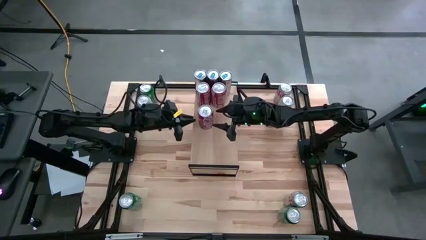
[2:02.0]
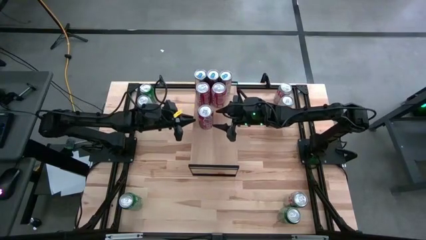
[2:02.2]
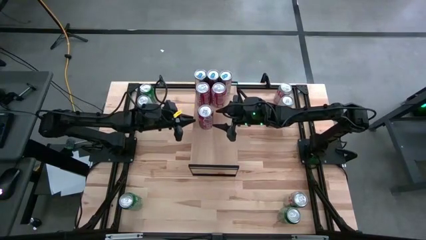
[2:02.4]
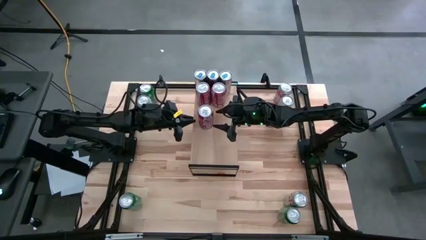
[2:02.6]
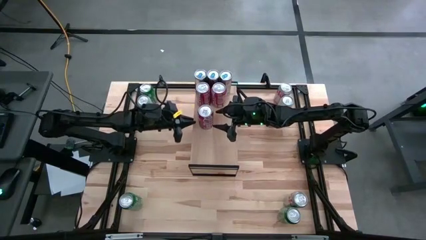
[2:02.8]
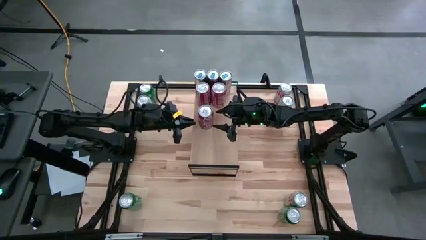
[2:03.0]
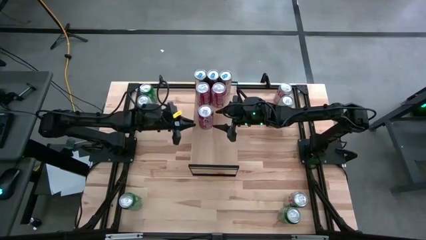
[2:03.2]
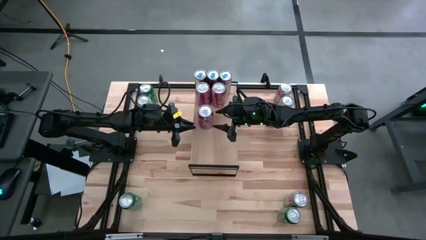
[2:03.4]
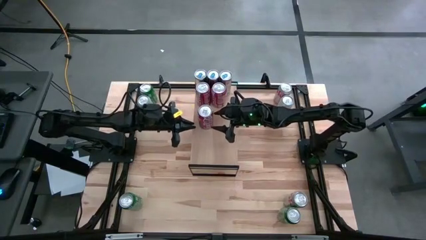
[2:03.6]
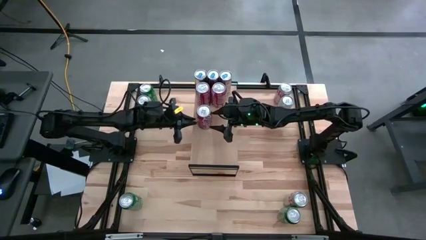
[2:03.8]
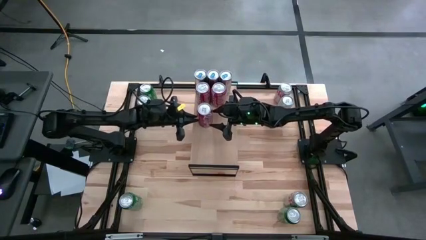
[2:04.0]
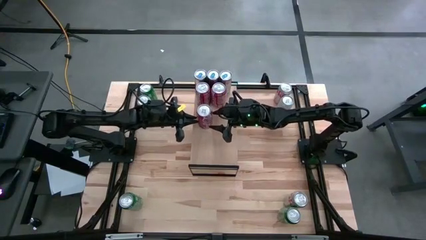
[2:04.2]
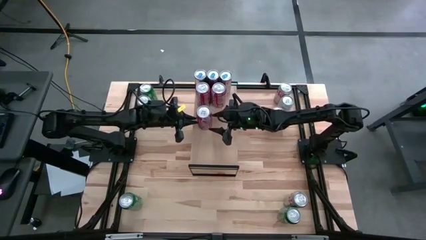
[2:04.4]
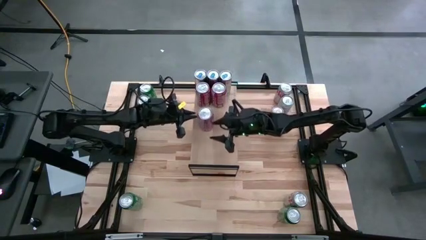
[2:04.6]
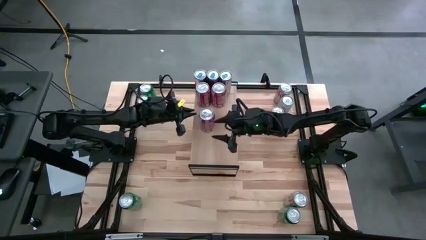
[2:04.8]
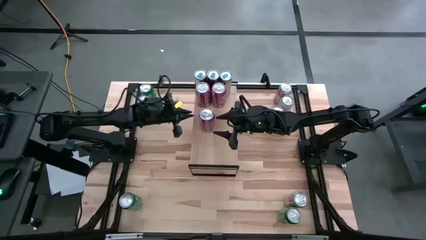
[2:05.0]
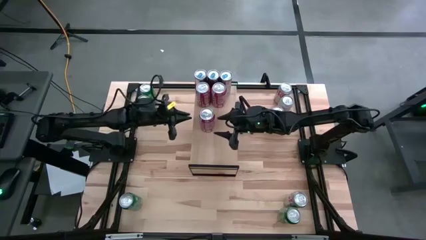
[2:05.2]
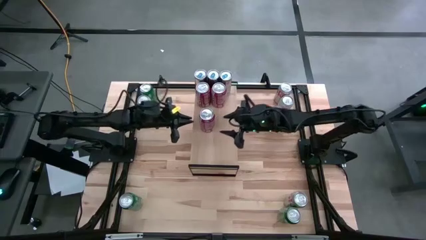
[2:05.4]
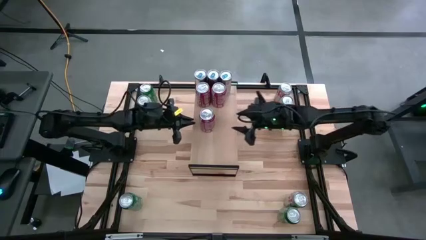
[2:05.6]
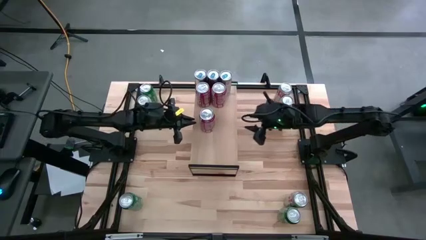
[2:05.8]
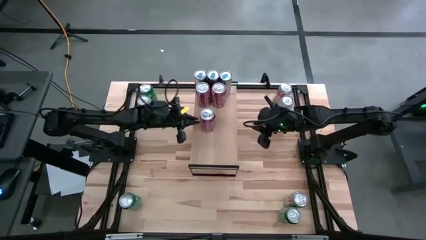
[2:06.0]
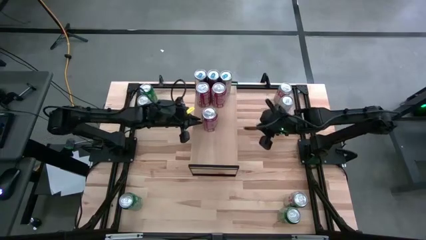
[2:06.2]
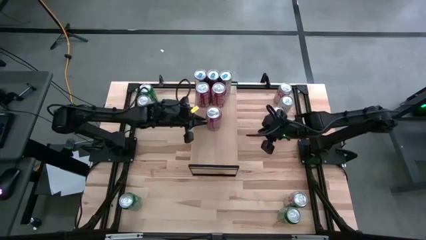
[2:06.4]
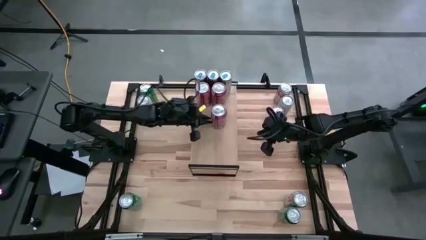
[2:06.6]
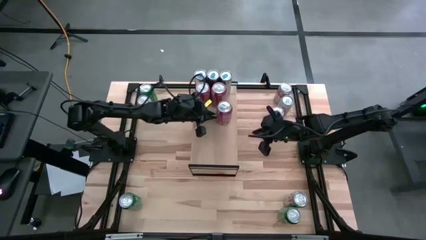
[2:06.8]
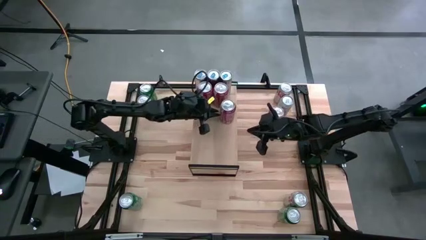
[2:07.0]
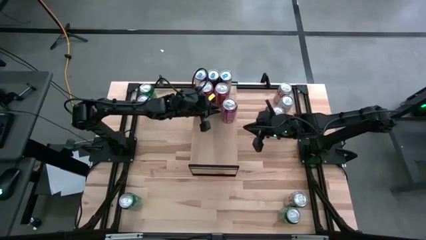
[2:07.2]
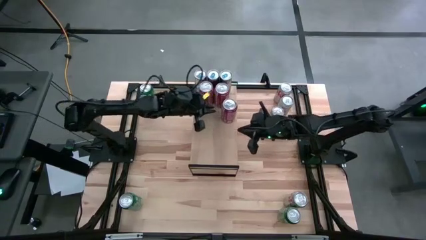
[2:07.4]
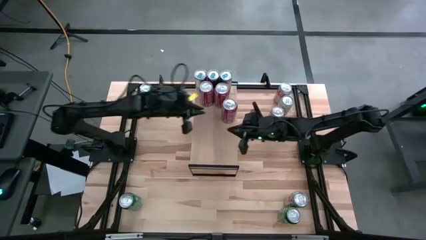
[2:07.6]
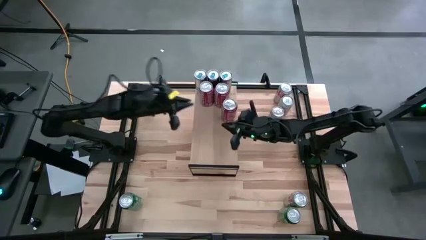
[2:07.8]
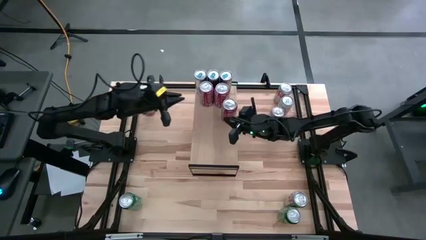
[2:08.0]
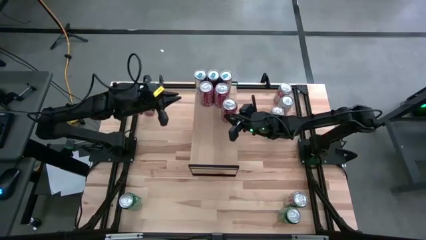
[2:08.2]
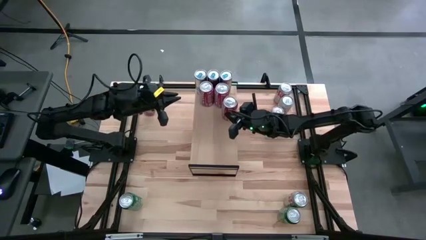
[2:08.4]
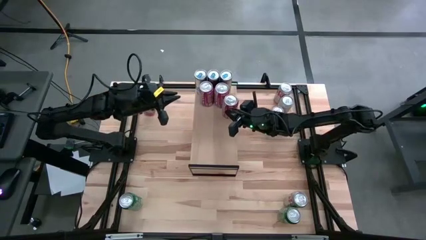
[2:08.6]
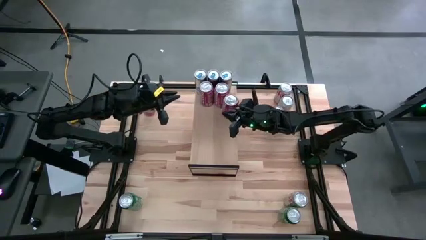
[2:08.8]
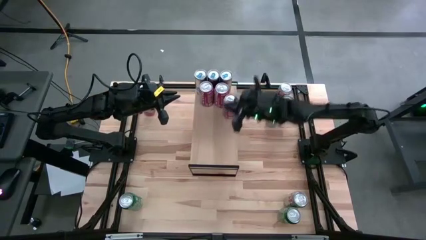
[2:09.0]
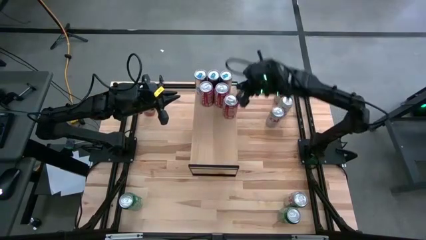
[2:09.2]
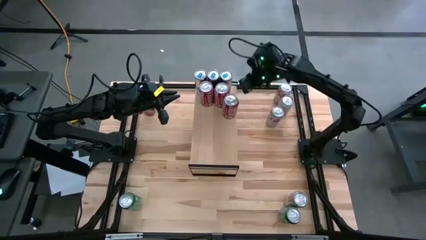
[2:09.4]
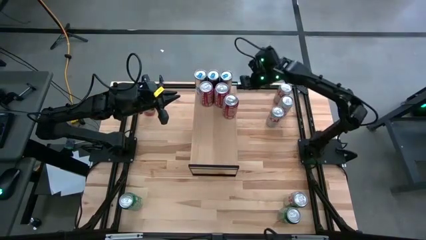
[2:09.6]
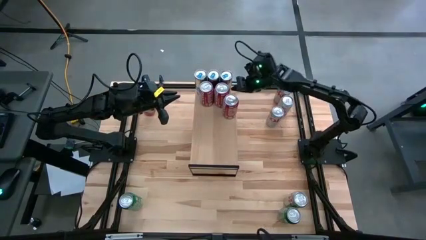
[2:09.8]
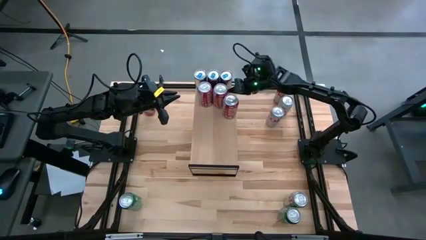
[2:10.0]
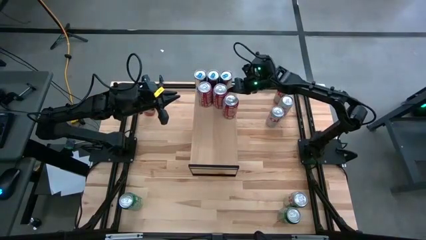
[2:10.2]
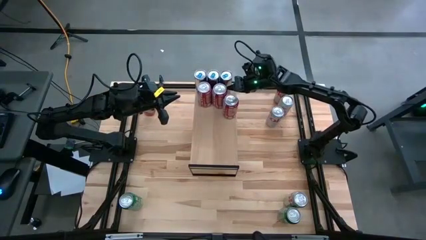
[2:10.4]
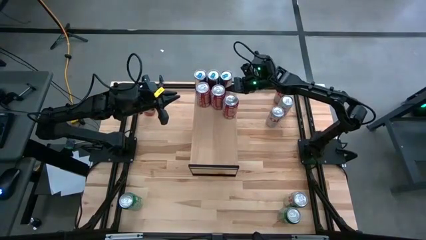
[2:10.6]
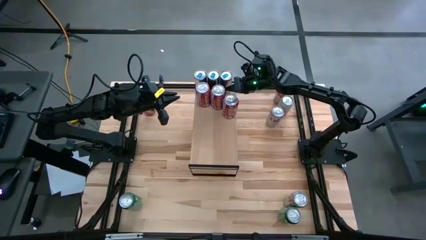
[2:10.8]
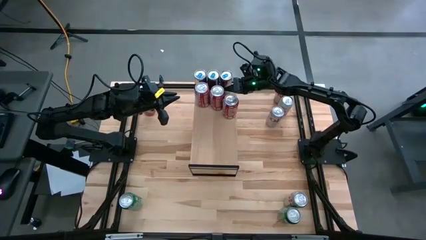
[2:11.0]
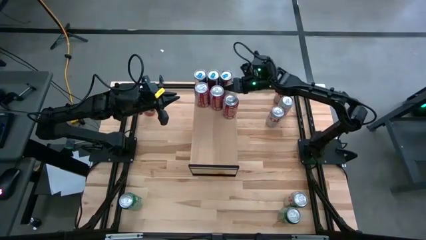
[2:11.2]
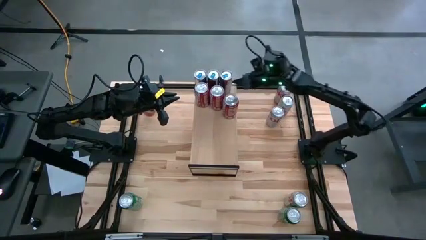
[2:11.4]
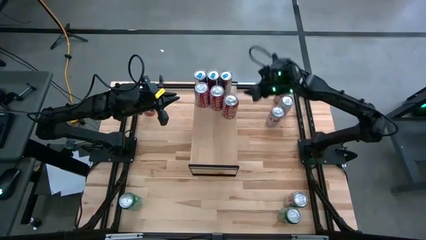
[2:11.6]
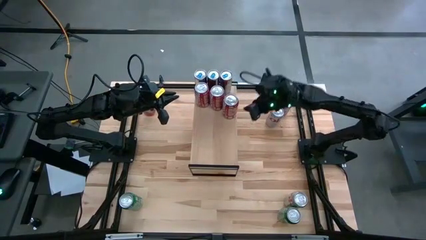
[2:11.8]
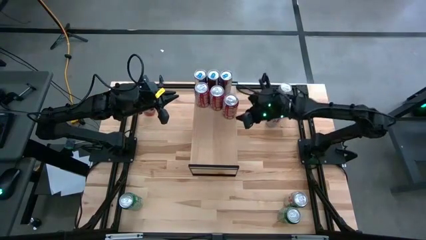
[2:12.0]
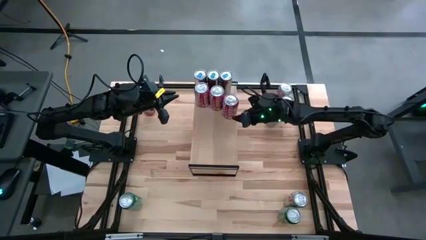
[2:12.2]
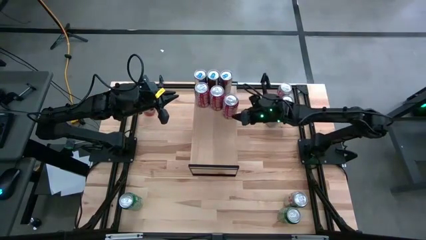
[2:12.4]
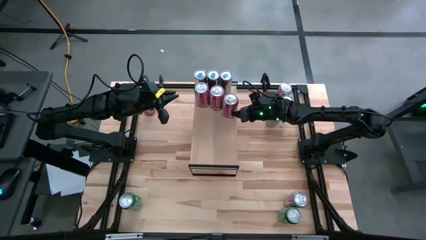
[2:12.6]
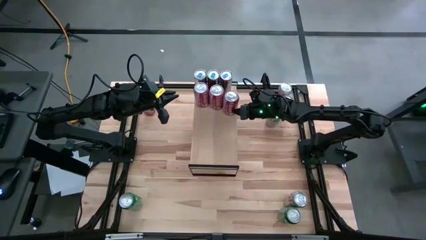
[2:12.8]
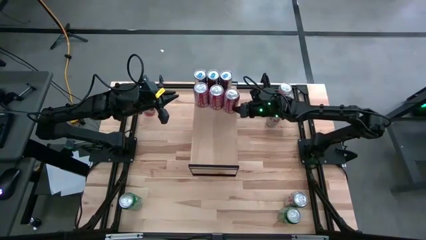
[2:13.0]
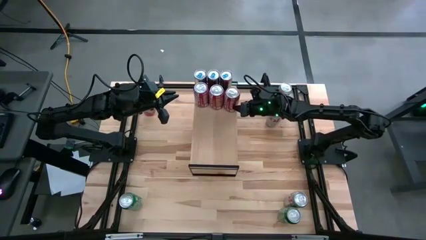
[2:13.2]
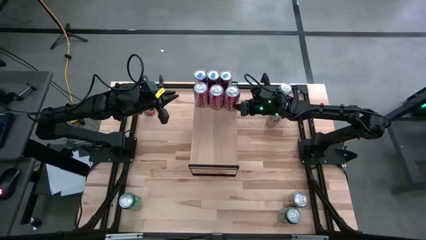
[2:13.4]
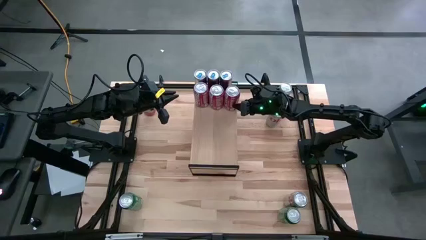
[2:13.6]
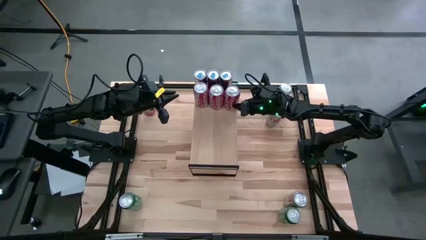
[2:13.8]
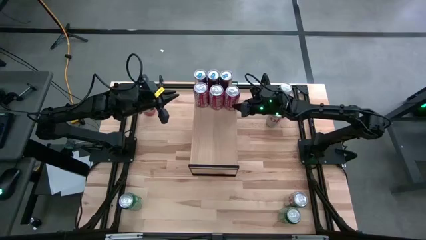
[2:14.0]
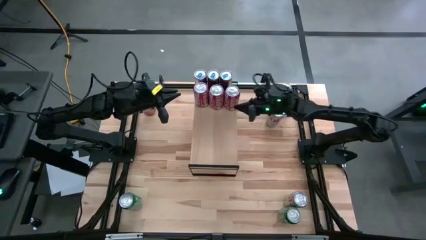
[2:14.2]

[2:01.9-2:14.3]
Task: Place canned beverage on shelf
Put the red white soda can on the shelf
